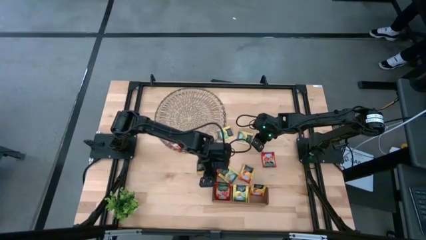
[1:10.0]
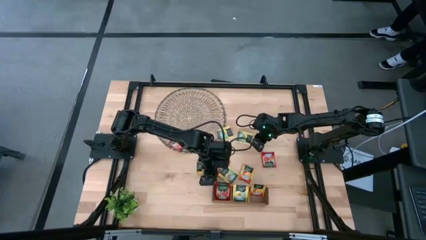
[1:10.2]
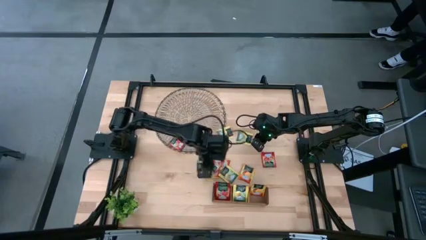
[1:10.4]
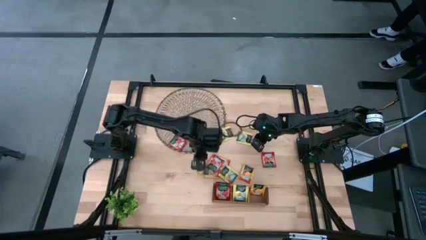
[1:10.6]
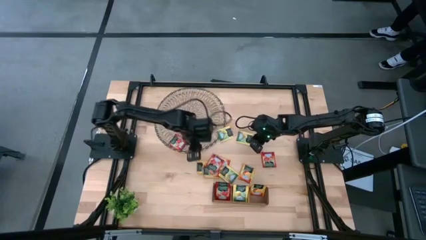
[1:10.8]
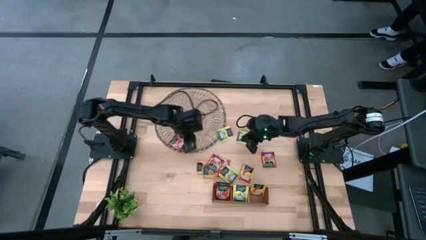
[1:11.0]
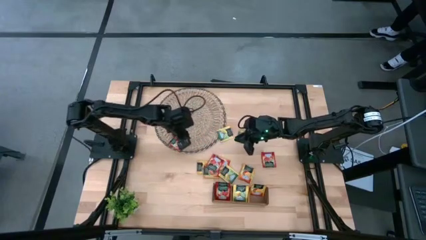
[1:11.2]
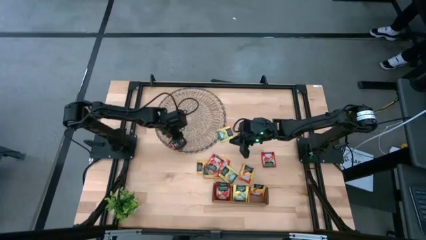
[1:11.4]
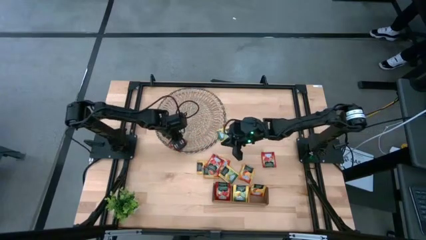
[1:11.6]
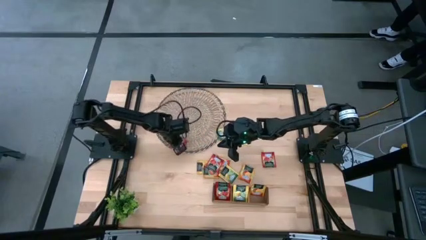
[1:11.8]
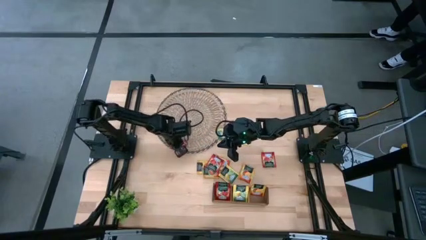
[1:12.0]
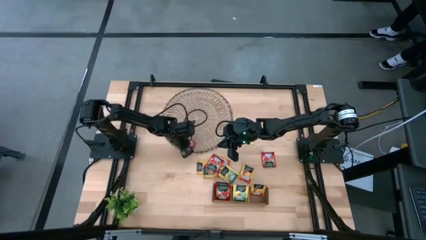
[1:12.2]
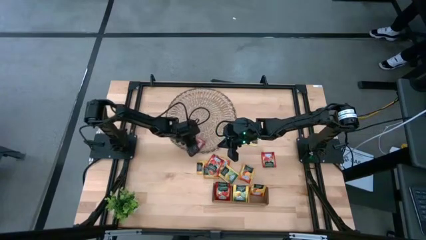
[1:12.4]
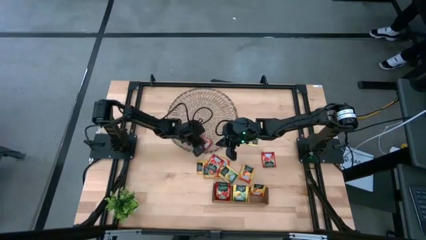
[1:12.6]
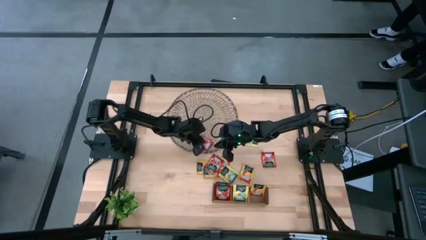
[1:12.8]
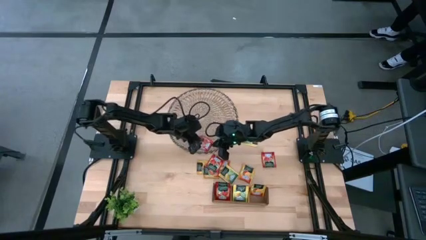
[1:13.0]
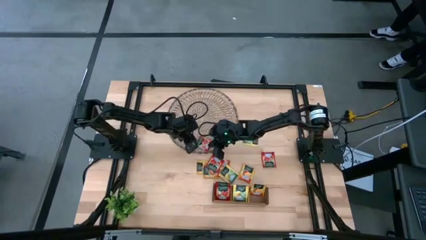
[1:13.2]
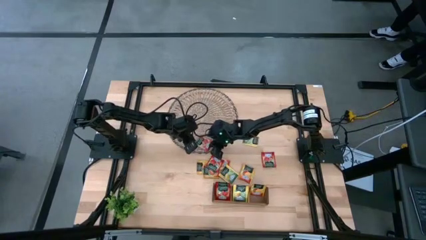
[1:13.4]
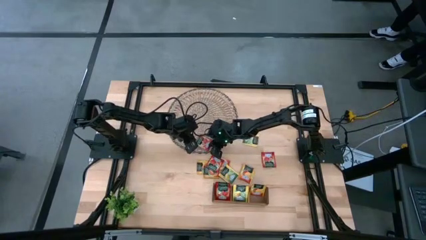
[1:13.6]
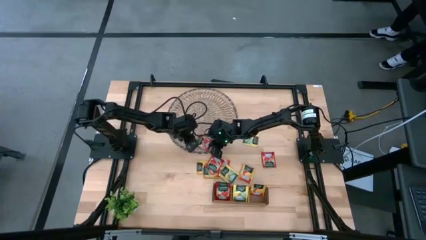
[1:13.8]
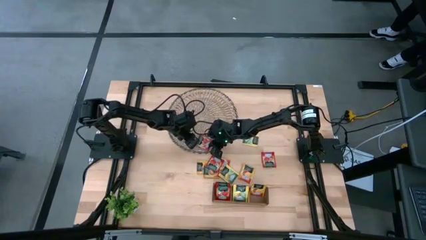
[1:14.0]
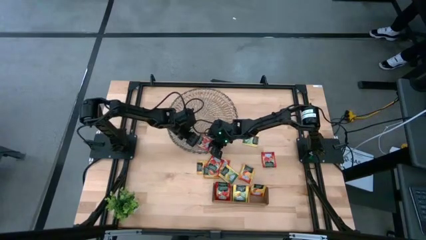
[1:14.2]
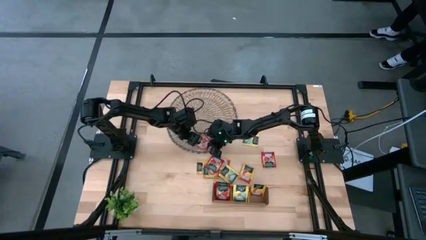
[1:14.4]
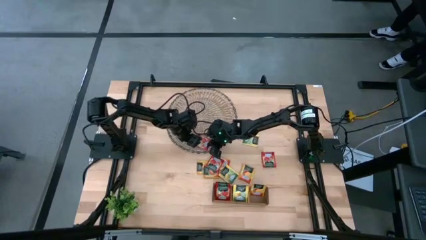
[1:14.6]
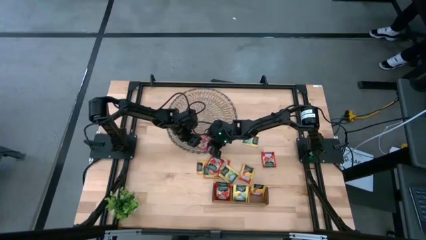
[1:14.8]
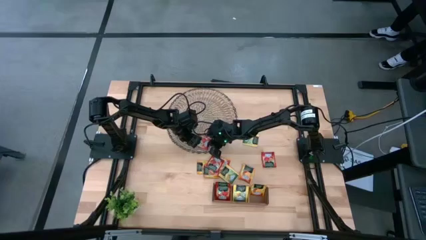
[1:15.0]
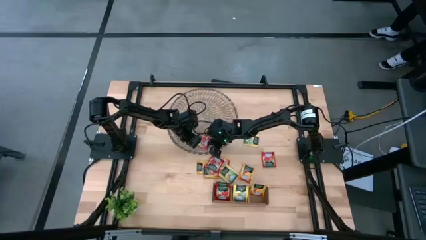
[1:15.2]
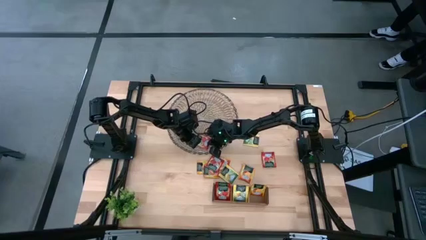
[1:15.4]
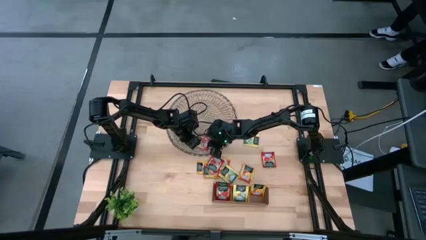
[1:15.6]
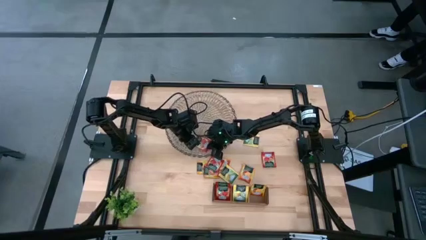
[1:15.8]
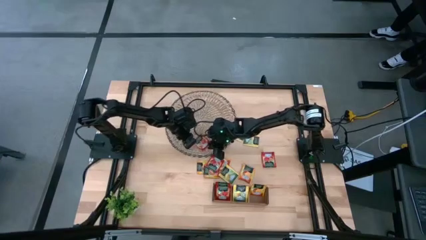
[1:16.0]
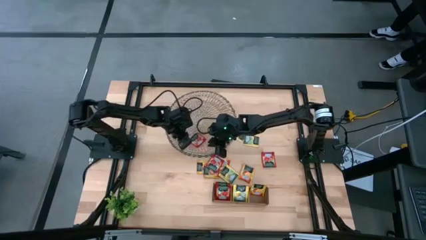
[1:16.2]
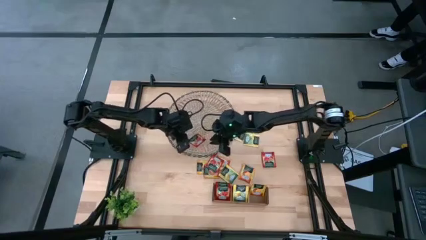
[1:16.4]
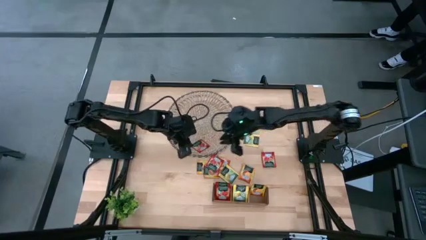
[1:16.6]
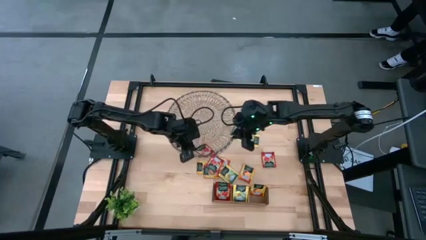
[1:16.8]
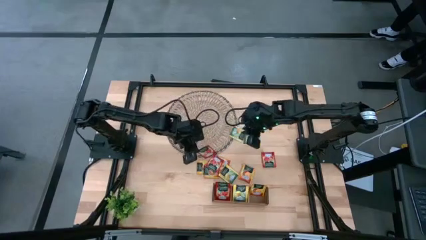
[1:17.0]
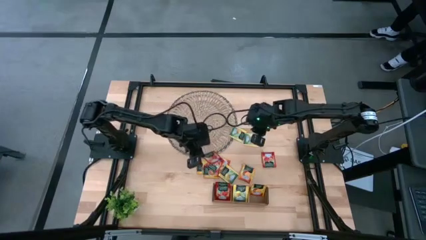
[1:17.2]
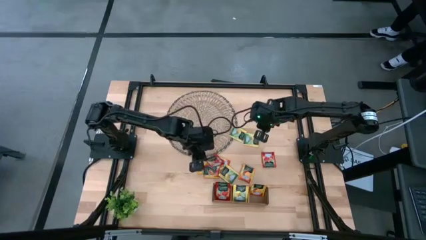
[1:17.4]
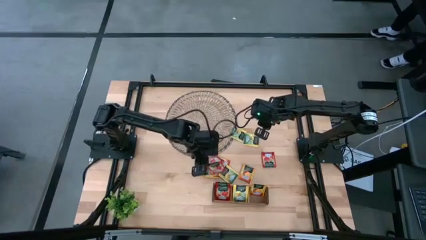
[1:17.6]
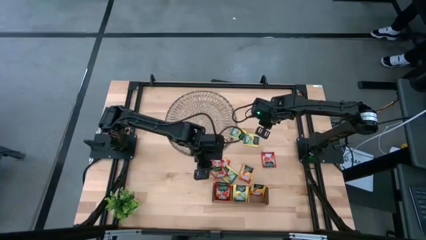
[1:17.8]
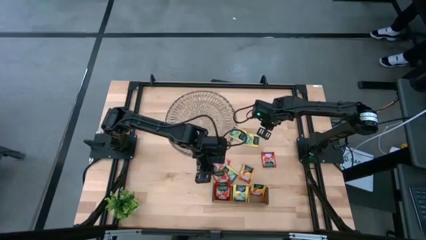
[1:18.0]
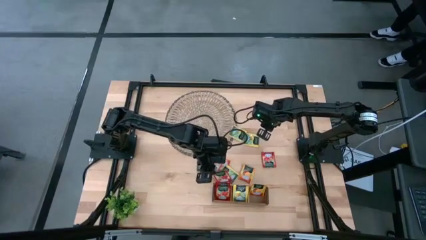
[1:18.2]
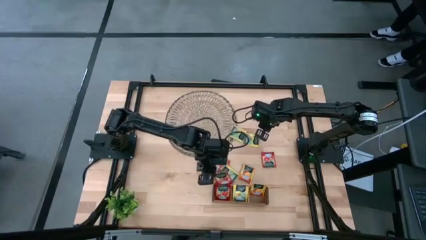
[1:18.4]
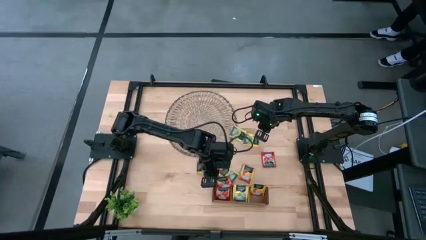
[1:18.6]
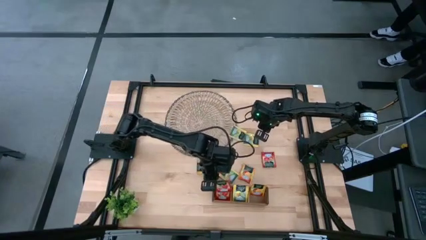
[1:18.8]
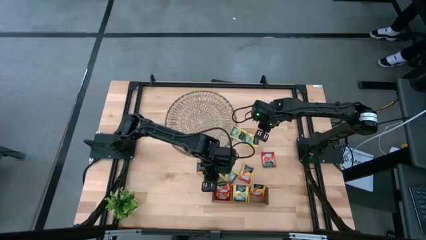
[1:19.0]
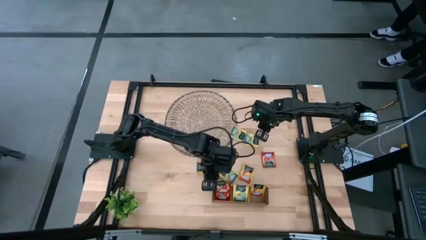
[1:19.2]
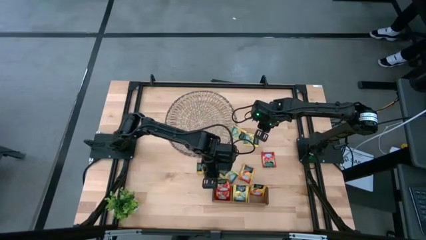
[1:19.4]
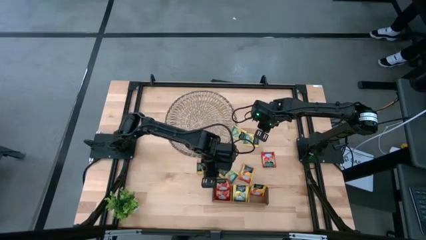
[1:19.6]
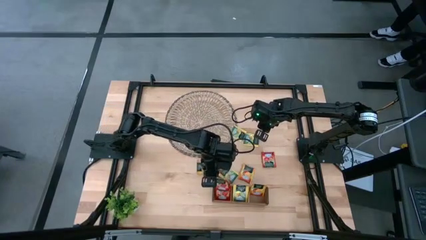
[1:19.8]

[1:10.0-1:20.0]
Task: Pick & Place Tea
Put the red tea bag into the left section of the wooden organizer

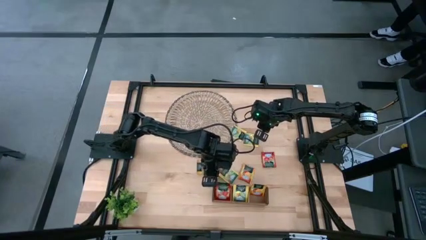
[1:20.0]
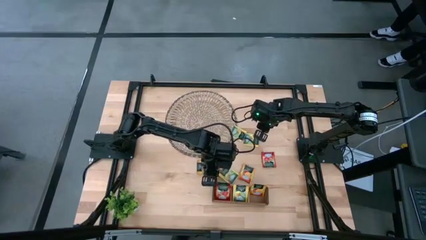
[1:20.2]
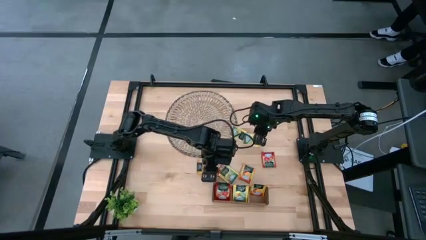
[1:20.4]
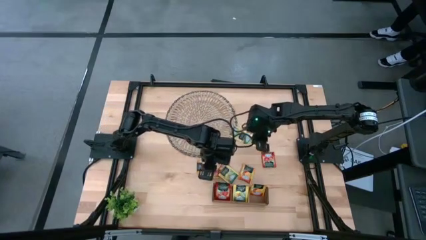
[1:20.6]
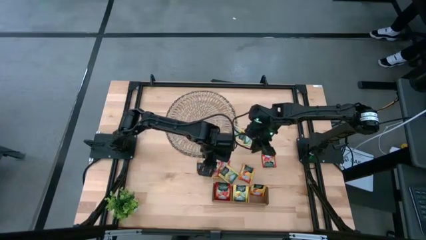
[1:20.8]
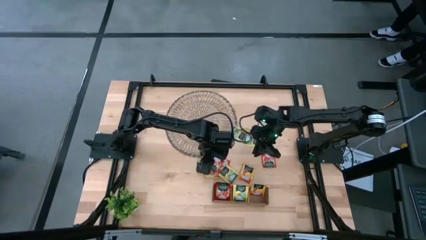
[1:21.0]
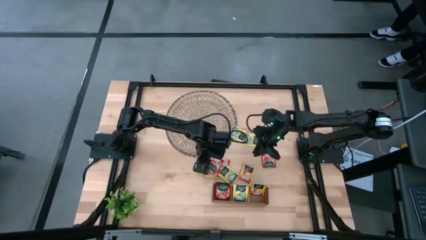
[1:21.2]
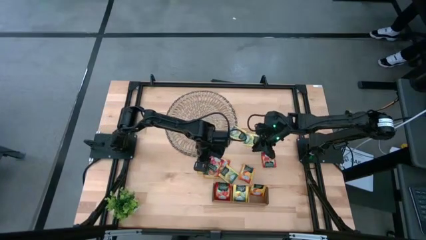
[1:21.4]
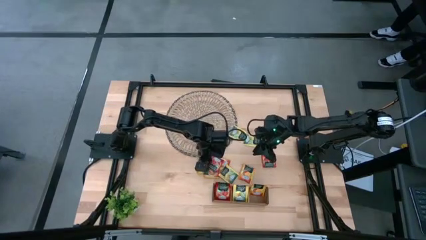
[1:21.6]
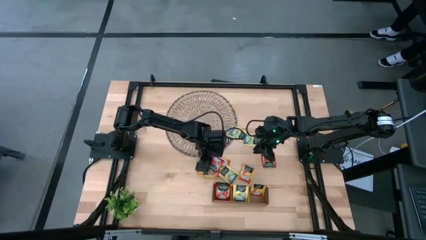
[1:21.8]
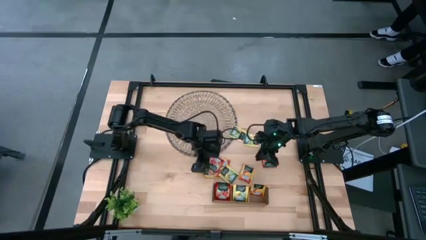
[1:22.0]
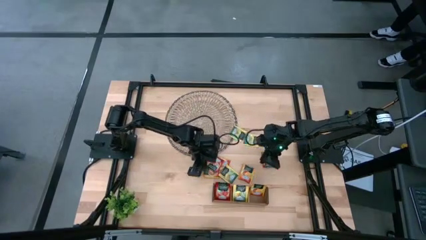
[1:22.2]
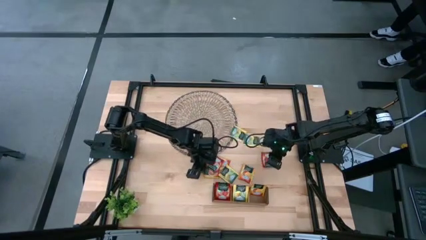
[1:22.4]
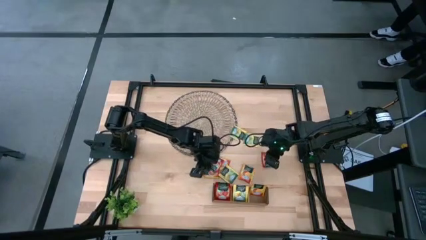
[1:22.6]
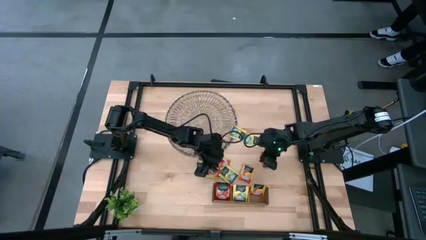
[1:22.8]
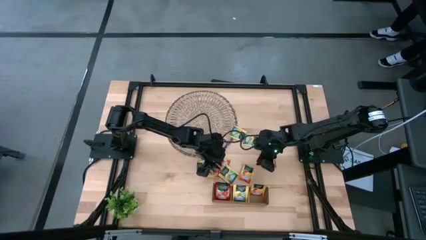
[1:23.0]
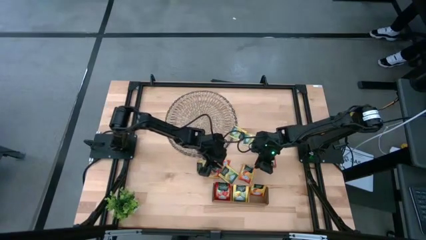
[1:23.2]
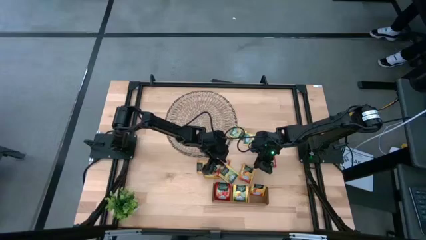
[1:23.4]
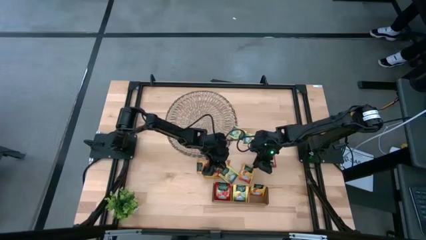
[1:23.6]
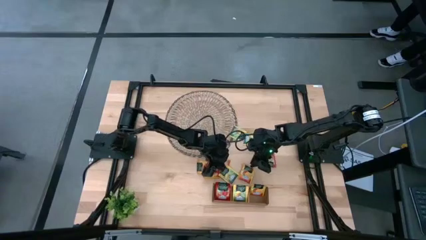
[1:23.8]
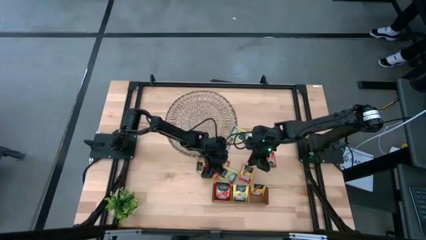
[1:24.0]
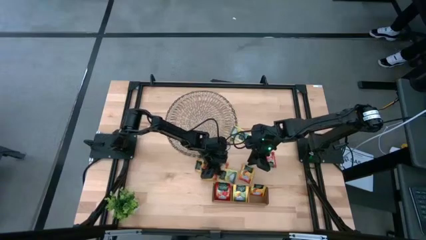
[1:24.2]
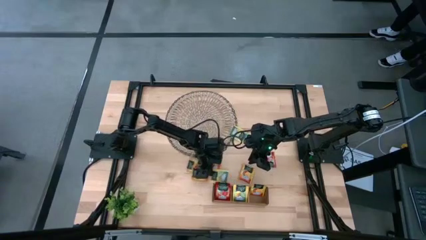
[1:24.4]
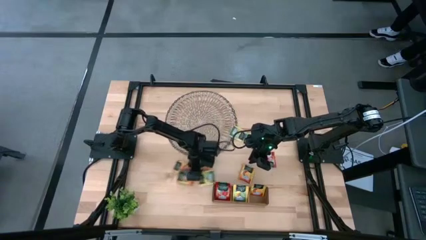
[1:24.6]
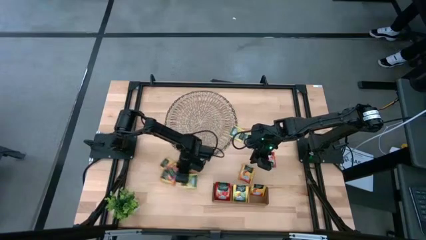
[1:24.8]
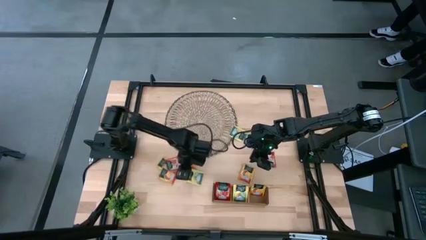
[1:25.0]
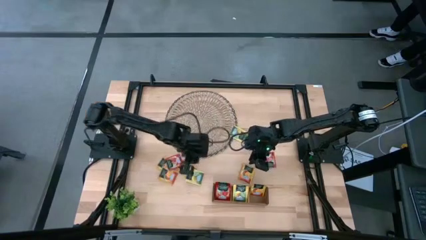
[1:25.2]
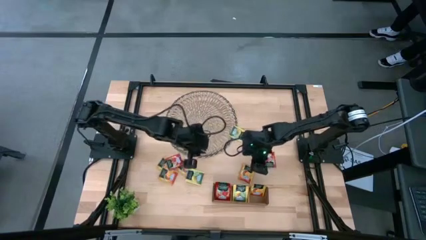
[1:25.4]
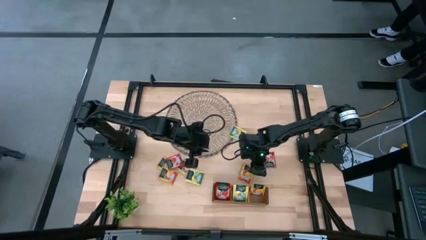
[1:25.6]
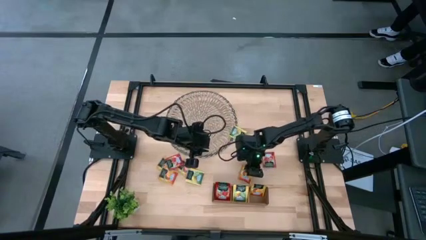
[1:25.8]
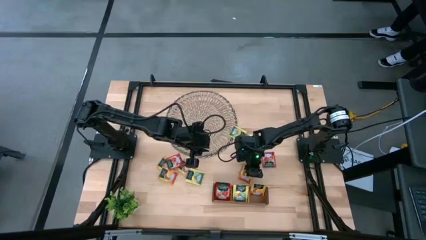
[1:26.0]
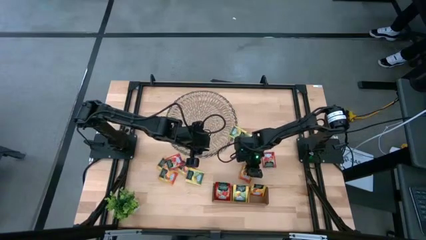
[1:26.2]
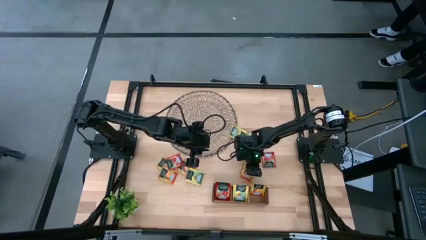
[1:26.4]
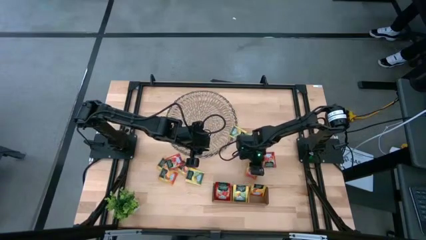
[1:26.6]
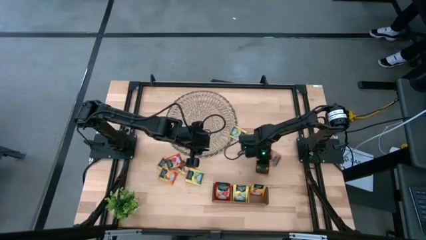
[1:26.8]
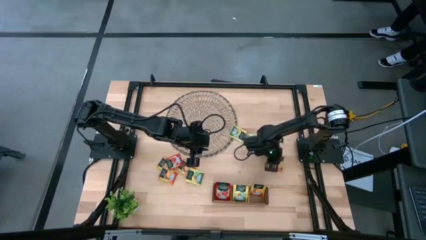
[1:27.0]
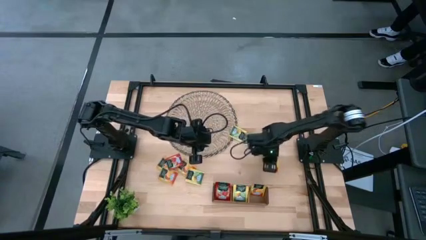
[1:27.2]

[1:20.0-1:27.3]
Adjust the tea bags

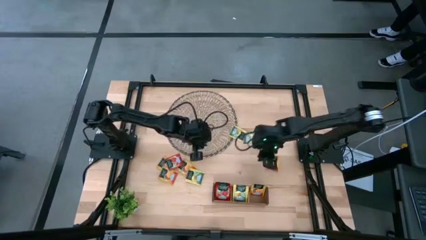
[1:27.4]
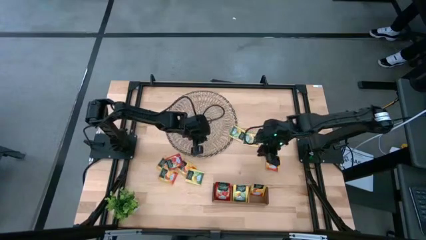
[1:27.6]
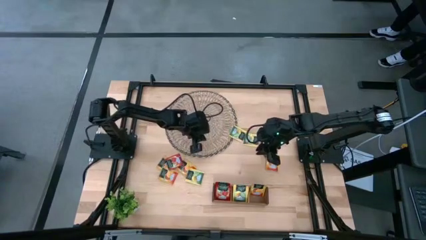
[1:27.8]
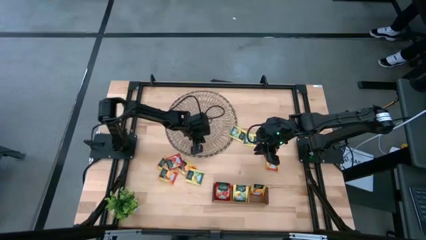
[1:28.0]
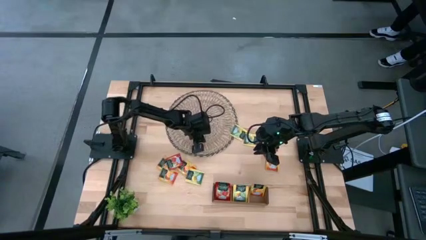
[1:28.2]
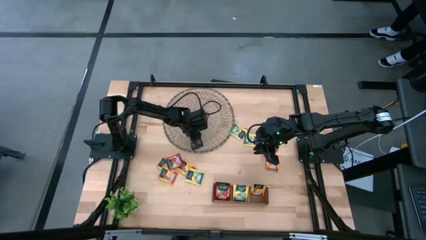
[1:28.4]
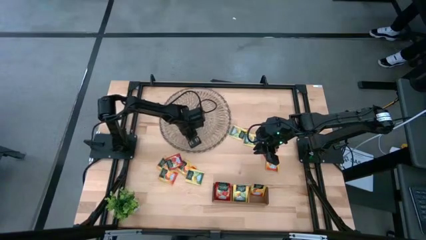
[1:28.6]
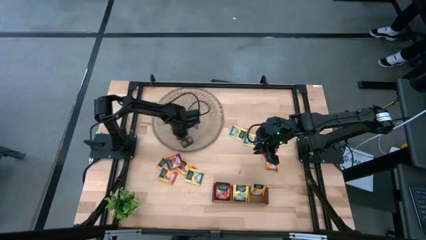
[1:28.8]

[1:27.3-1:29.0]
Adjust the brown mat
